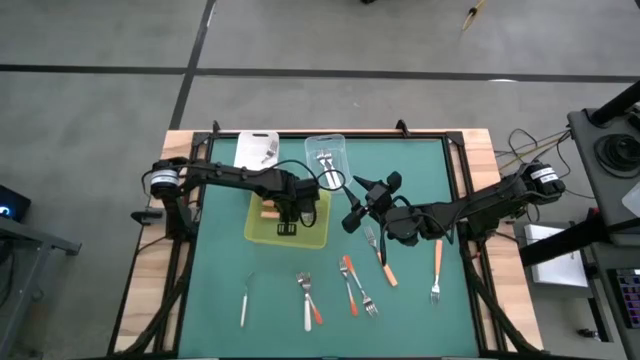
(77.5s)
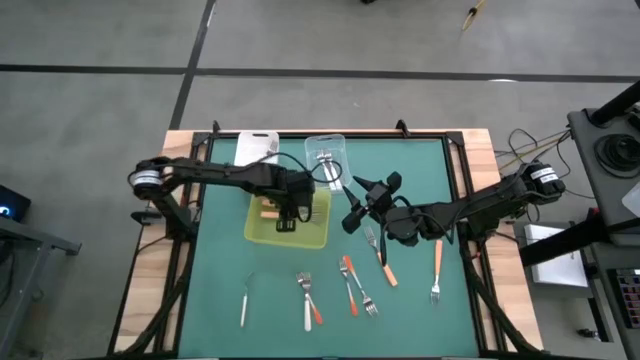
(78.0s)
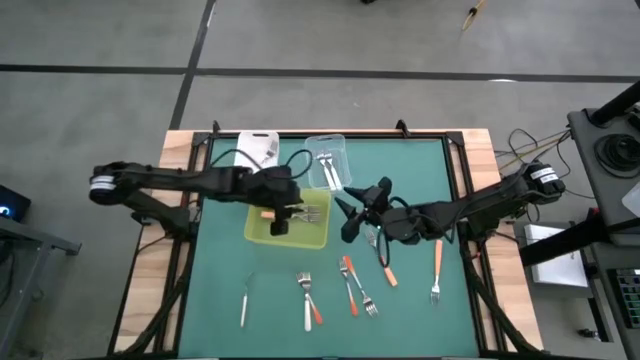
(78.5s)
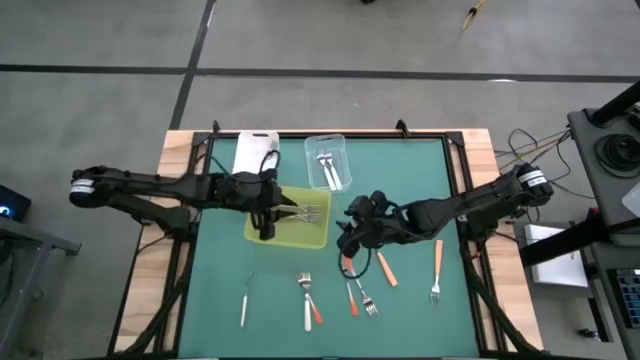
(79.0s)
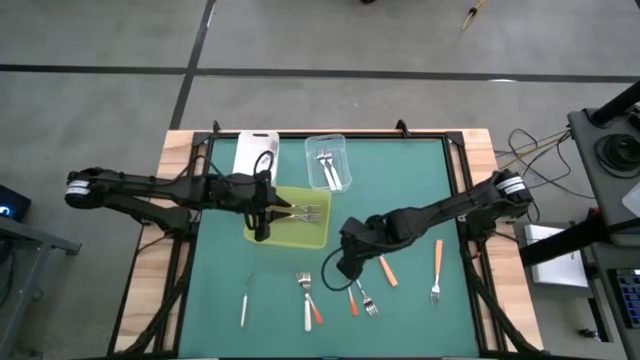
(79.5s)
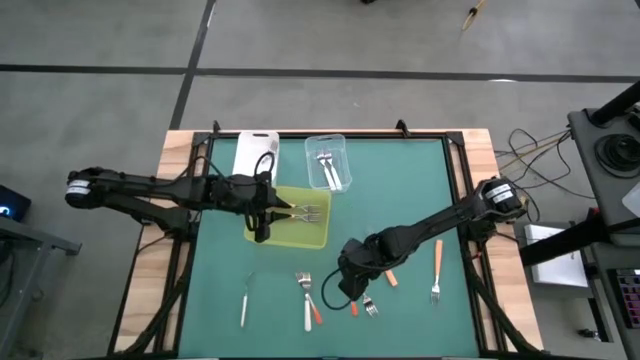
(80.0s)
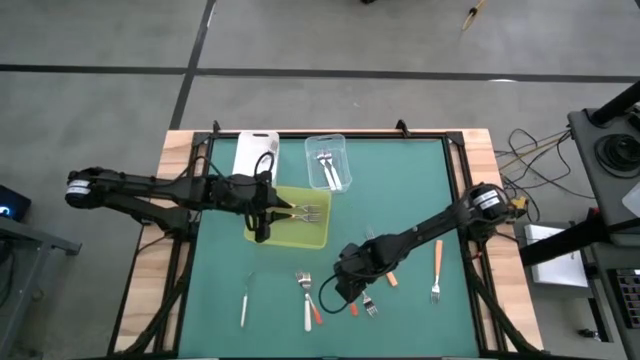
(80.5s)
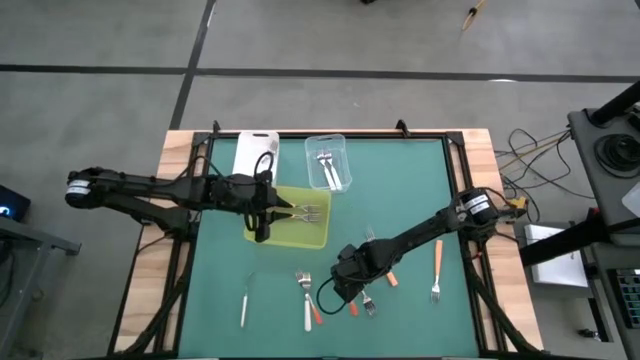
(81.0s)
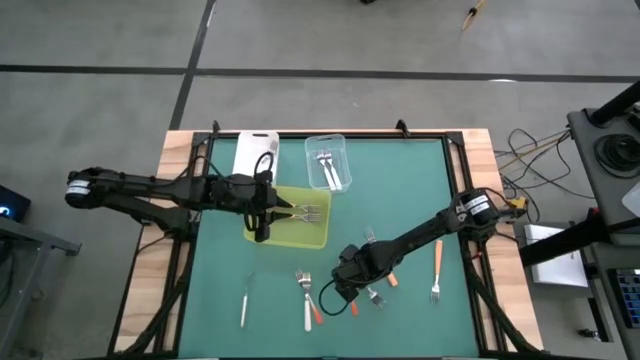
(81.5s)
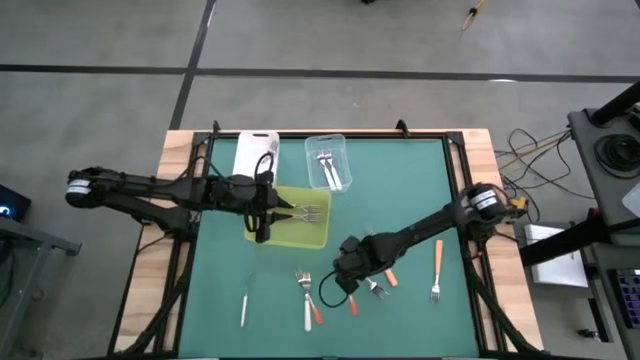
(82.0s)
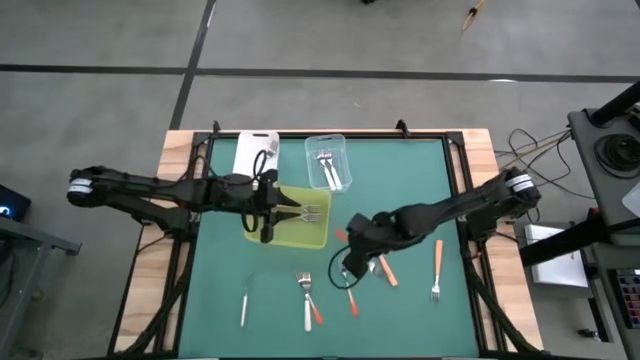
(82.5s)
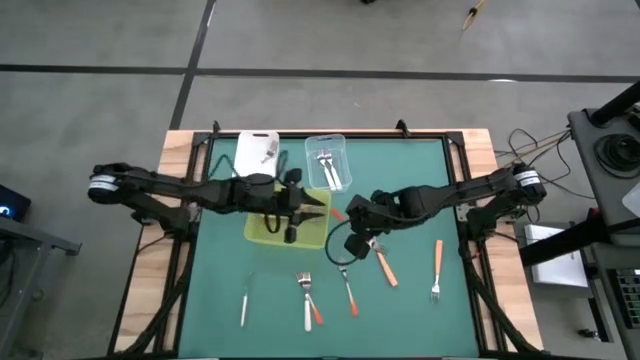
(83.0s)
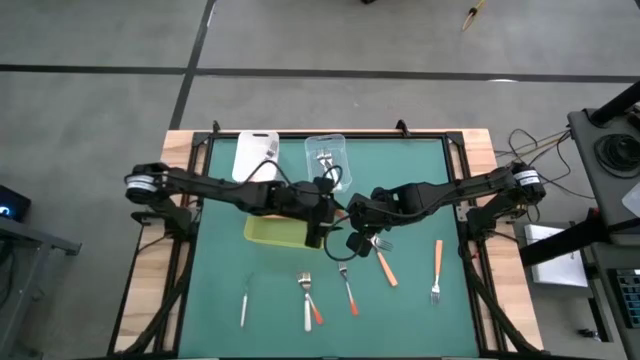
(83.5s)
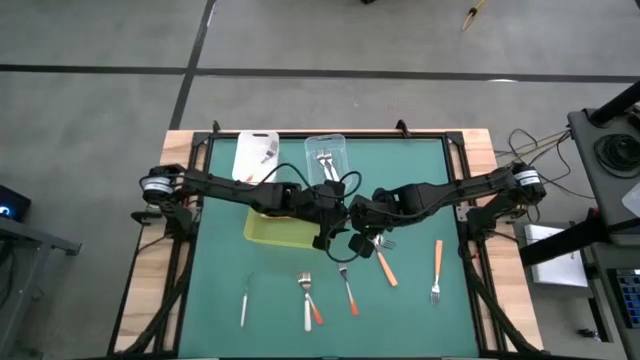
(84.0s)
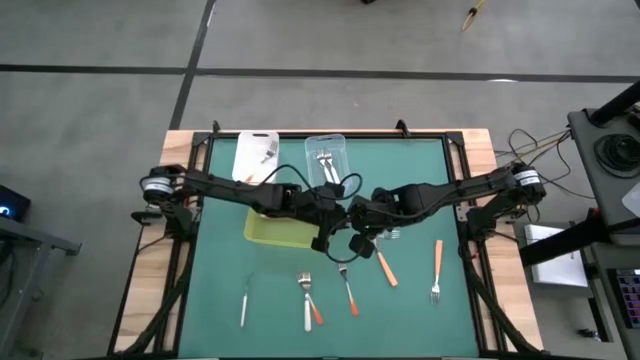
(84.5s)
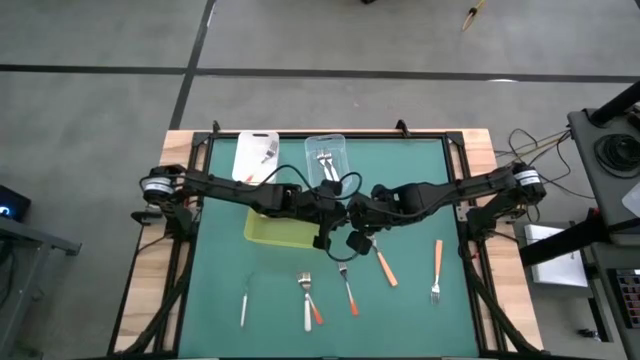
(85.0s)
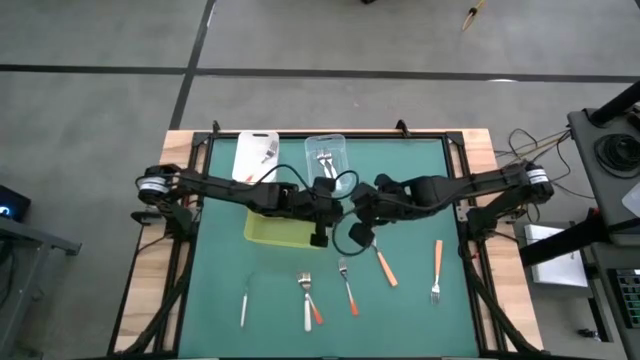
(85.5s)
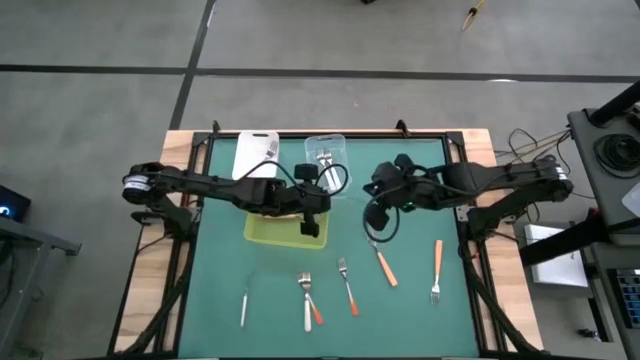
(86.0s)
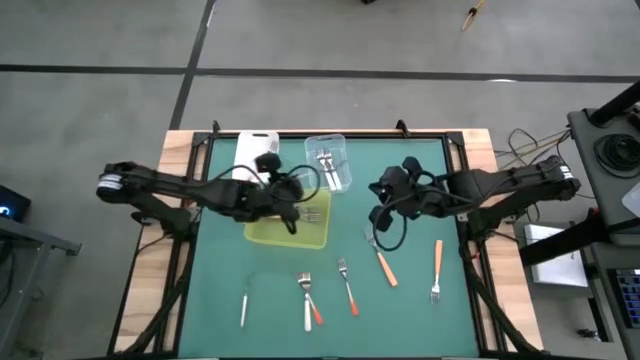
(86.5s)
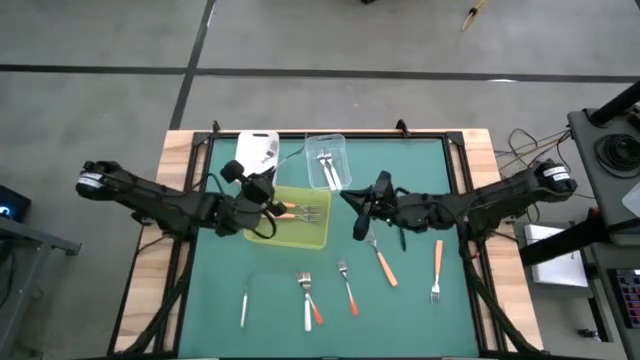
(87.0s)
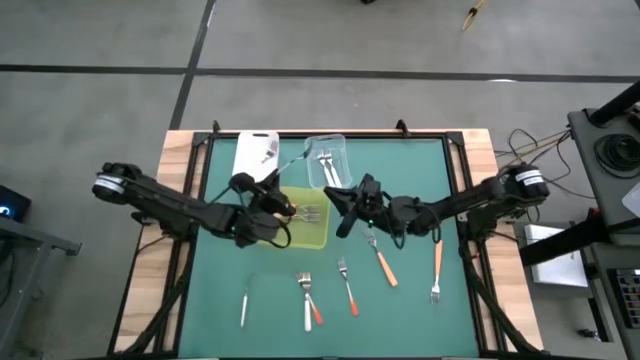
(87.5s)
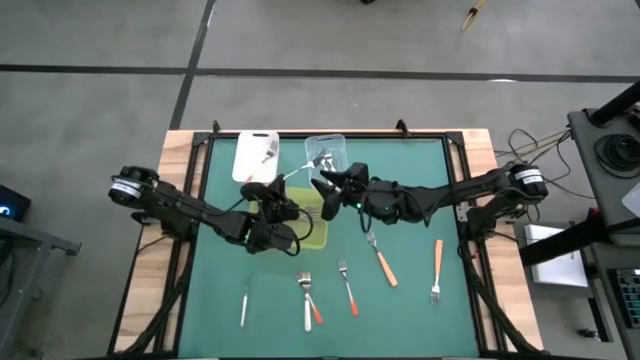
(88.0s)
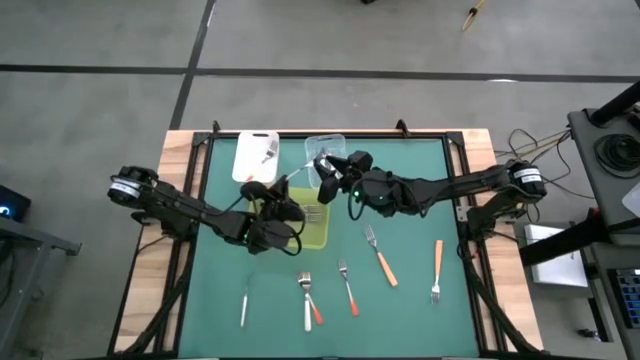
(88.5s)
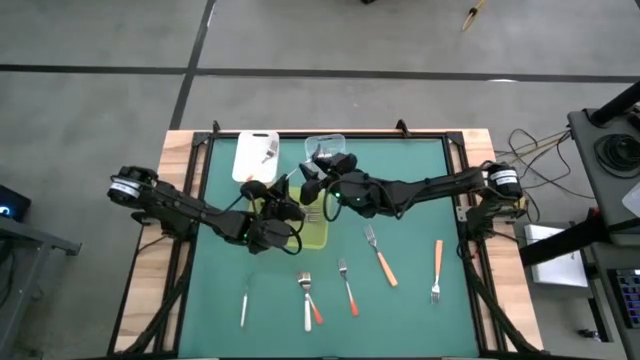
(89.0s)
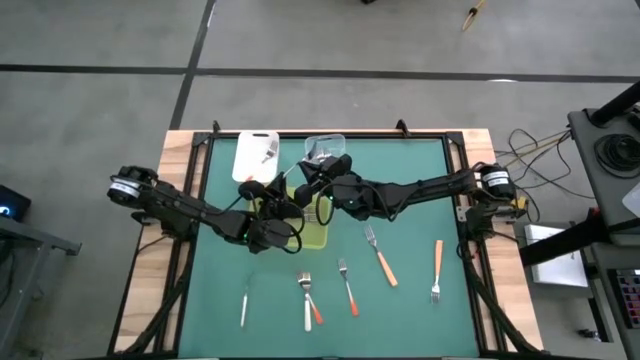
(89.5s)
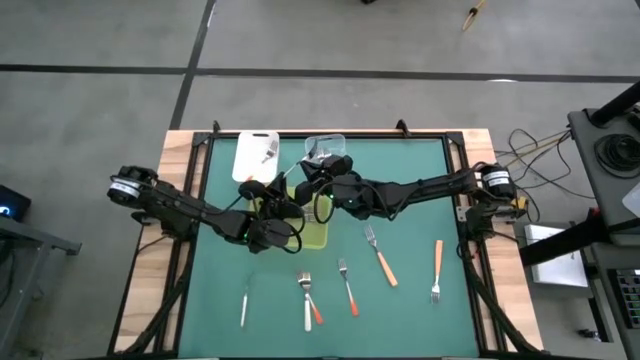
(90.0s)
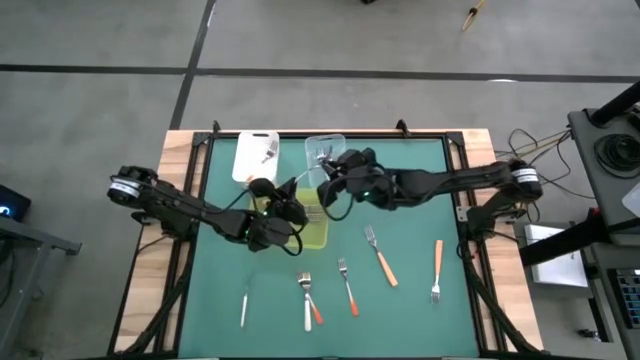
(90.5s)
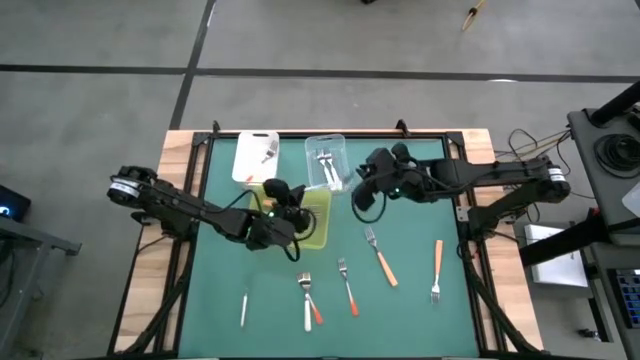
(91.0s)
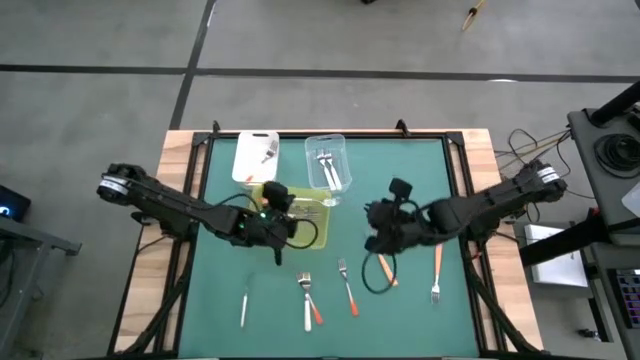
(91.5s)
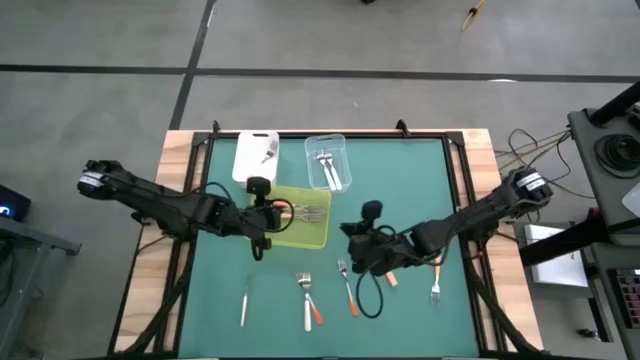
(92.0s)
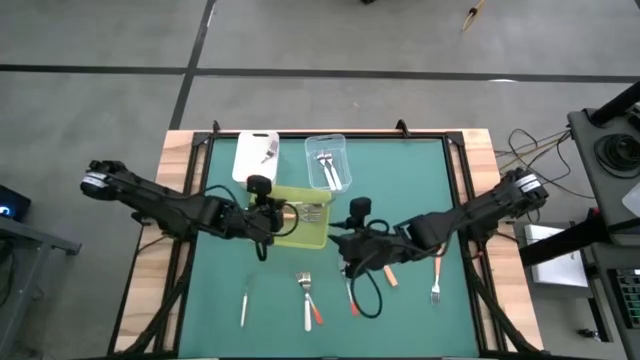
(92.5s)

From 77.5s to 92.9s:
Task: Sort silverware by color (type)
Put the orange fork into the white bin

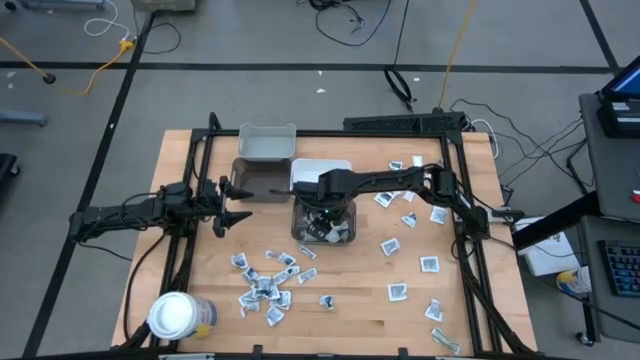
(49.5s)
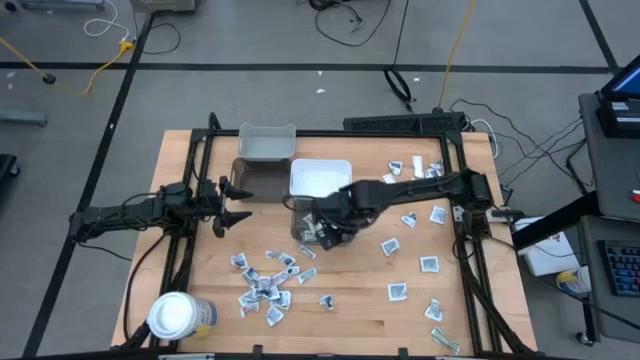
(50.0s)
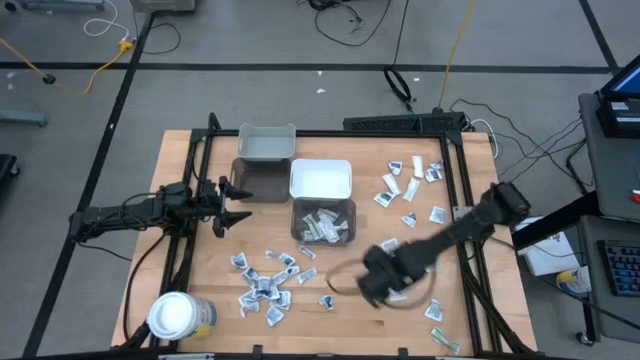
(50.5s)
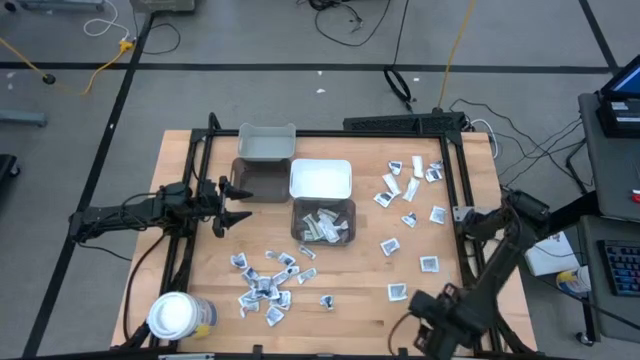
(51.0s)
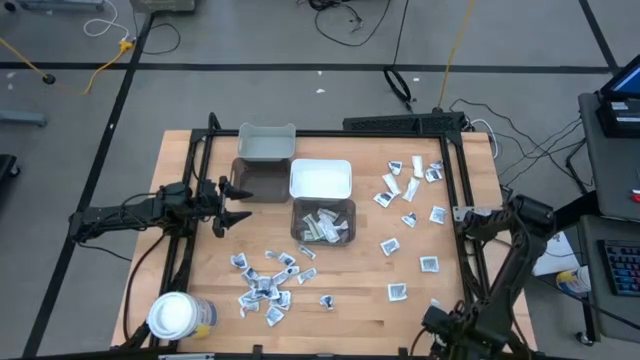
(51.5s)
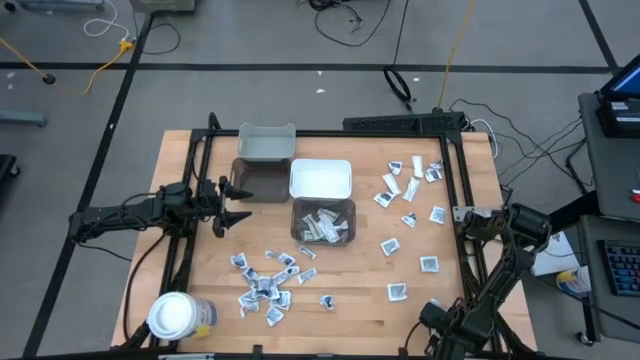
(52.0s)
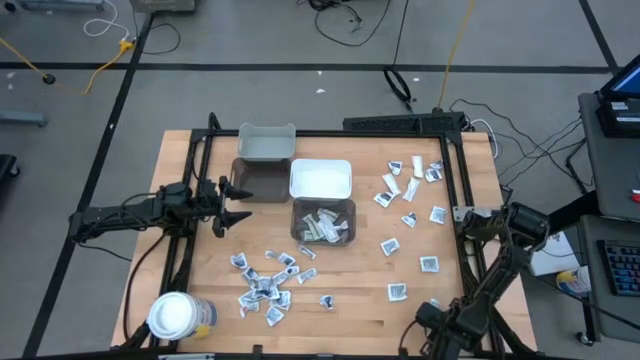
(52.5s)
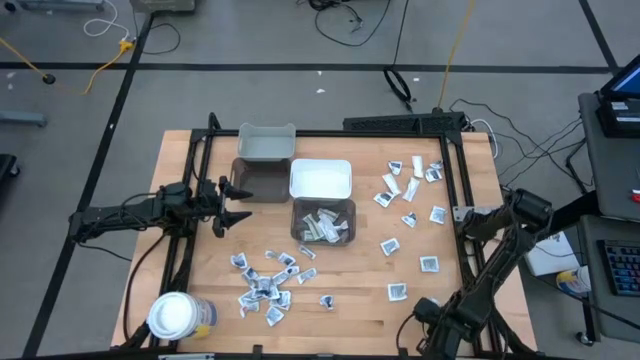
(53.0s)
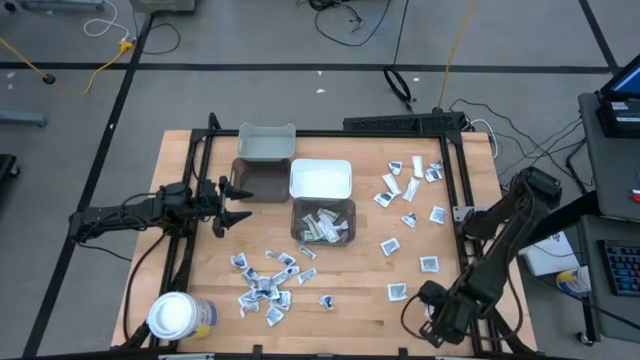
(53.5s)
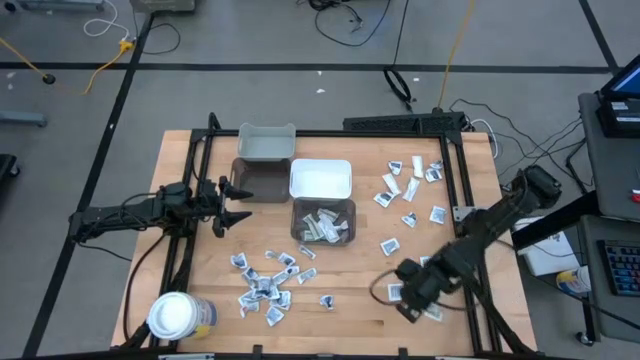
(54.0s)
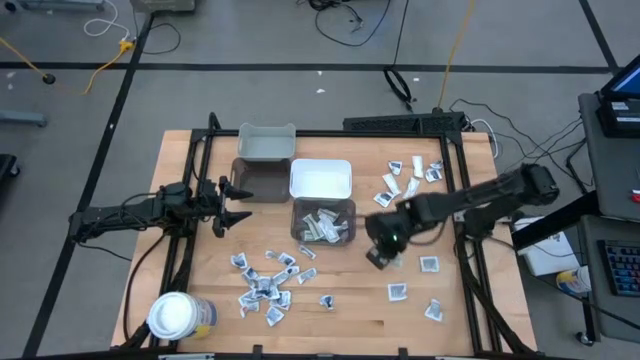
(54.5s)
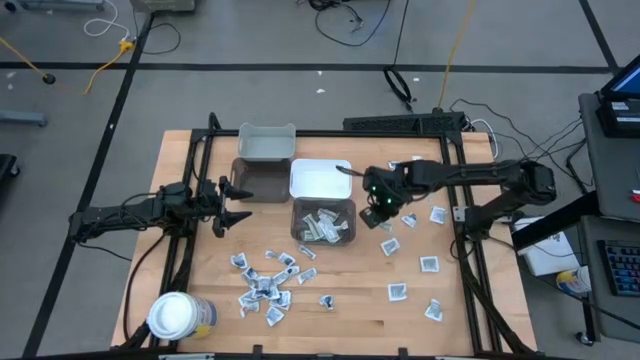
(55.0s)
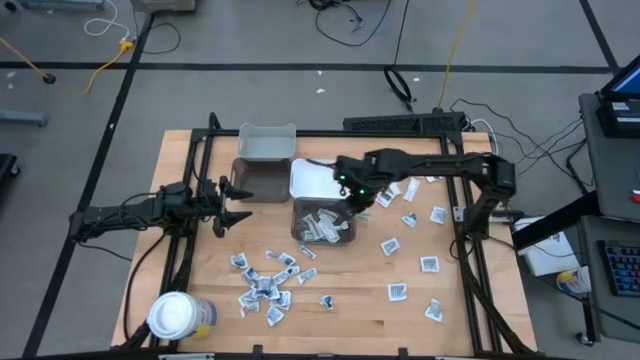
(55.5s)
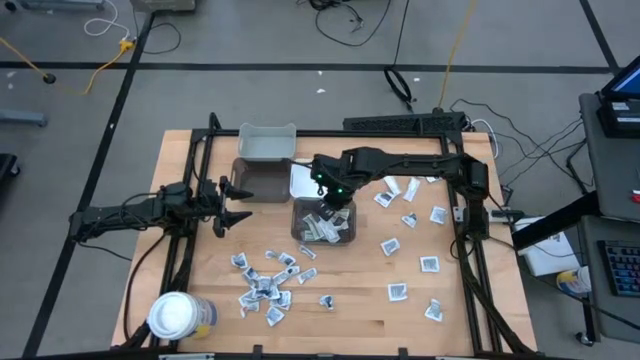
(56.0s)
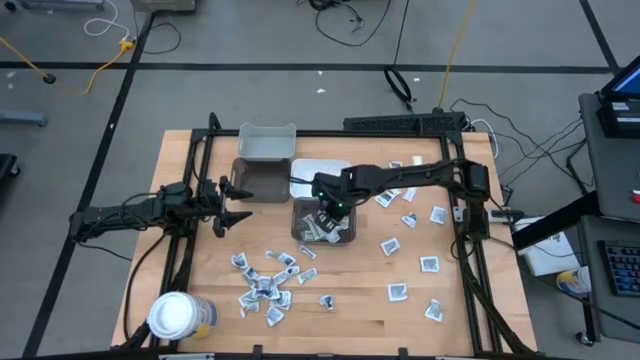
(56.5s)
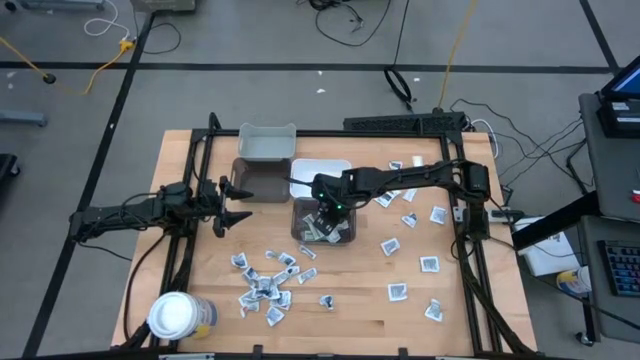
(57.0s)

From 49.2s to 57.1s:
Task: Pick & Place First Aid Supplies
Put the green bandage pack into the right black bin
